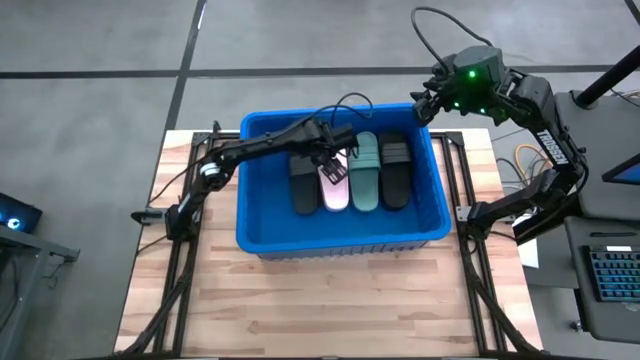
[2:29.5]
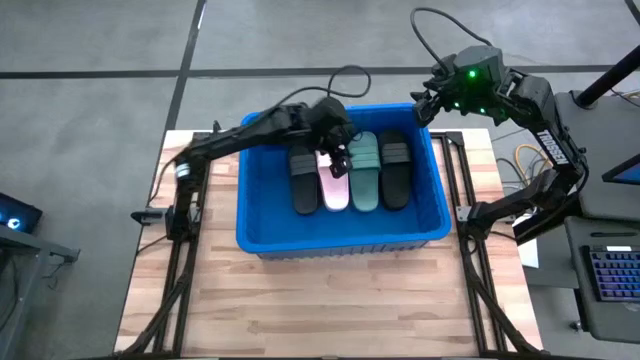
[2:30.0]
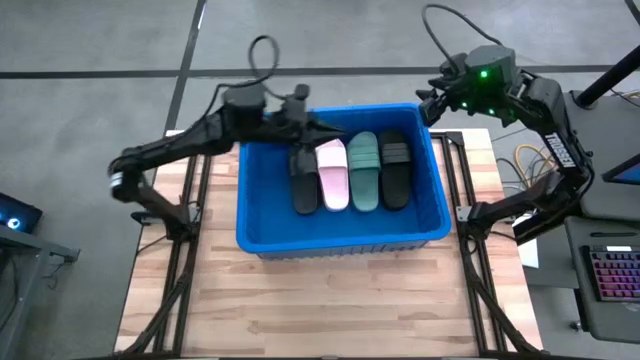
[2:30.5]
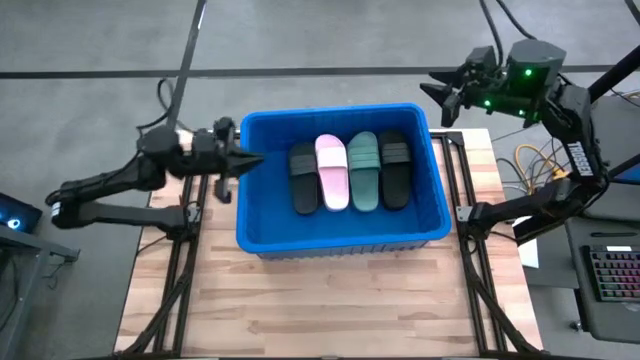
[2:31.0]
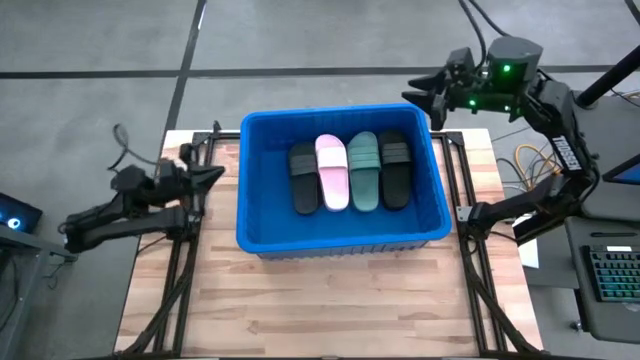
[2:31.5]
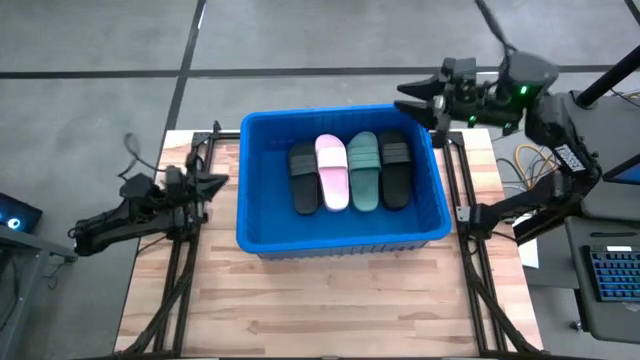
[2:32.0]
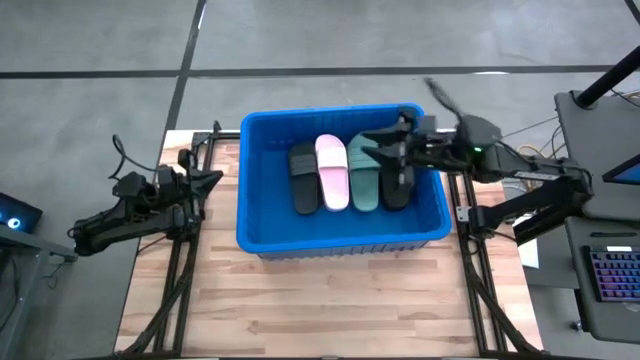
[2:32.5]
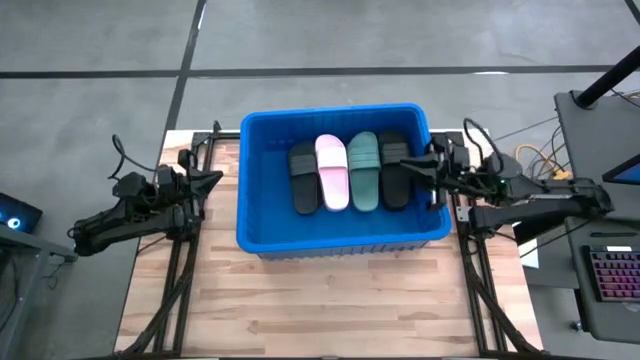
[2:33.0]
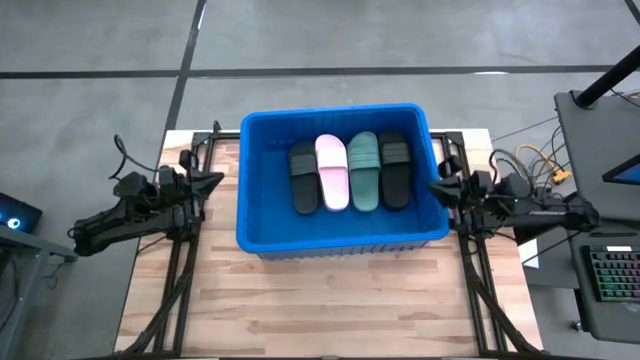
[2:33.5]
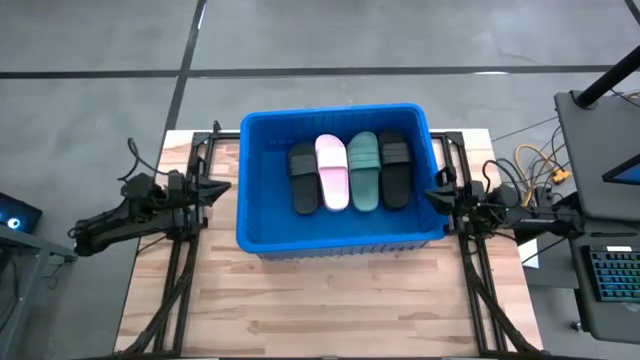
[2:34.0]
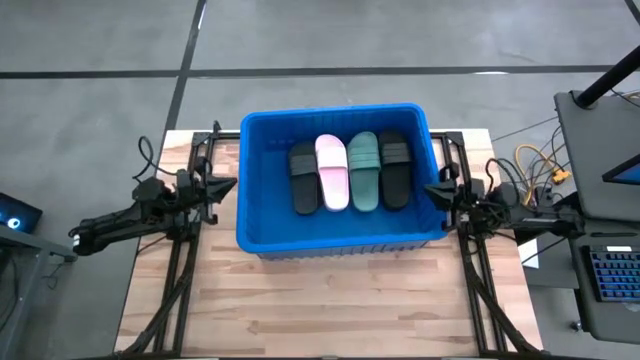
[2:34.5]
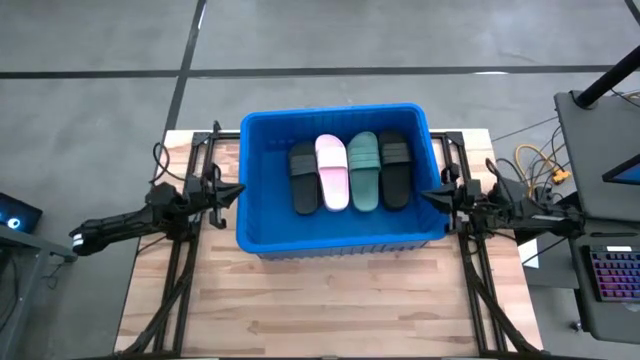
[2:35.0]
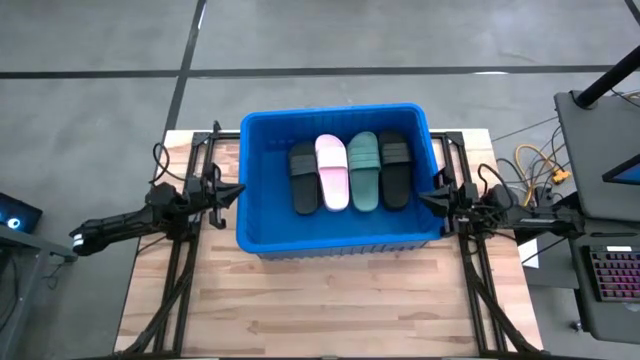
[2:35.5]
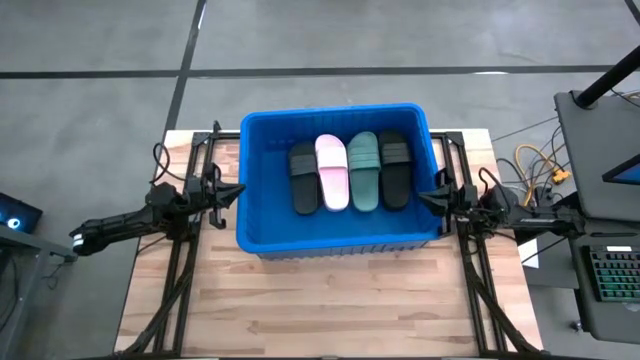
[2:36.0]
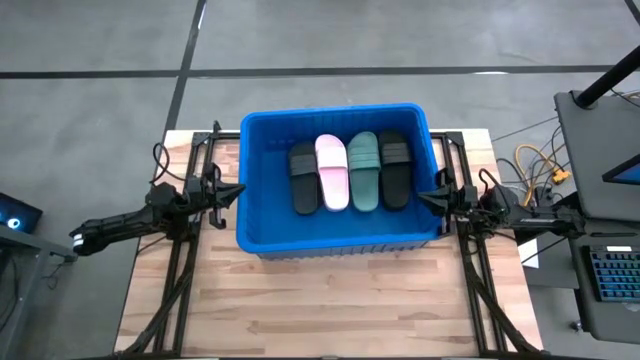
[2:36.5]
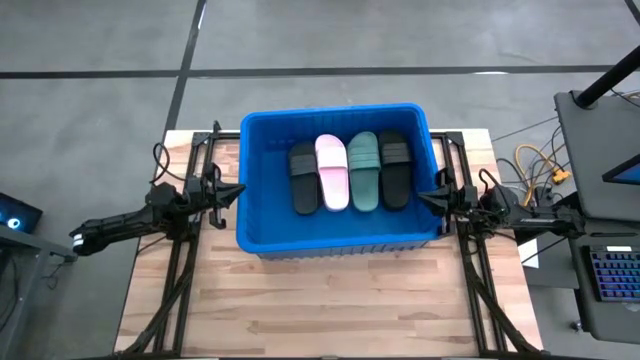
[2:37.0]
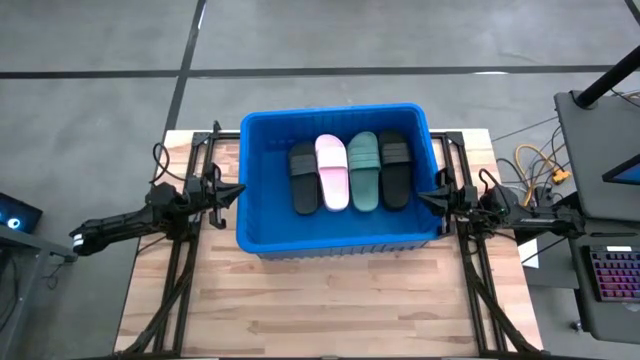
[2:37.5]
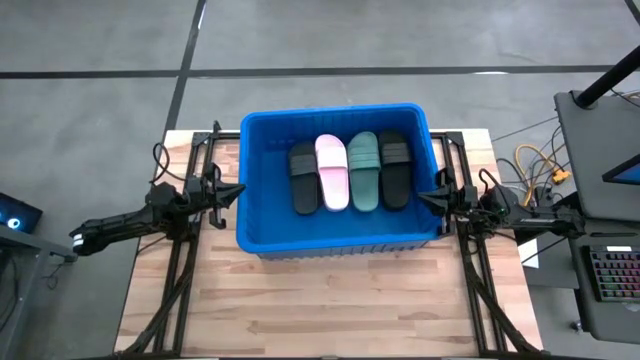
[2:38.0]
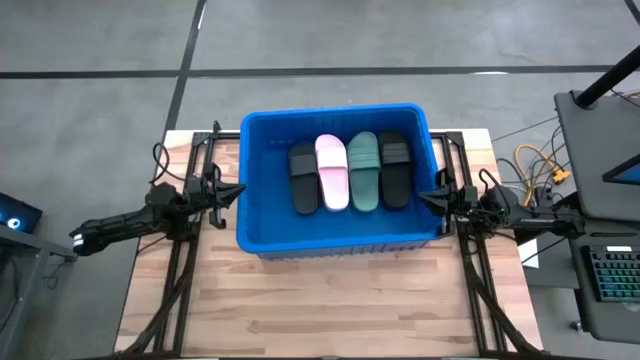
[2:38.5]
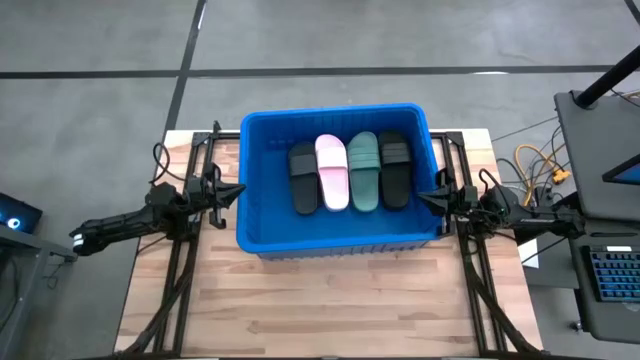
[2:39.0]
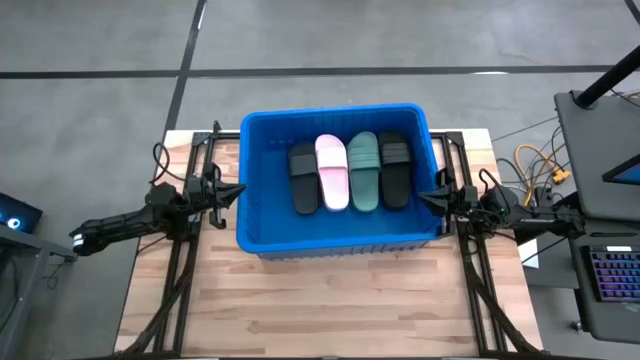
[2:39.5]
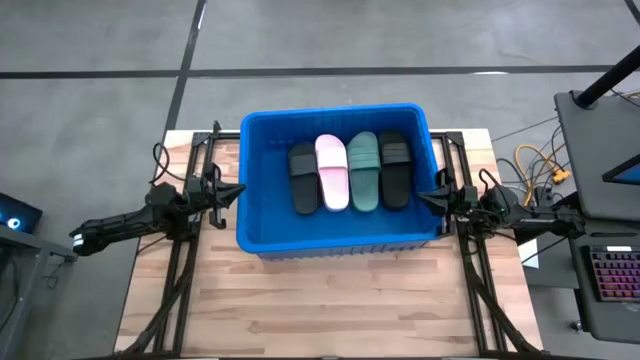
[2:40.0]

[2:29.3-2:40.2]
Task: Pick and place slides into bin
Return to Home Position

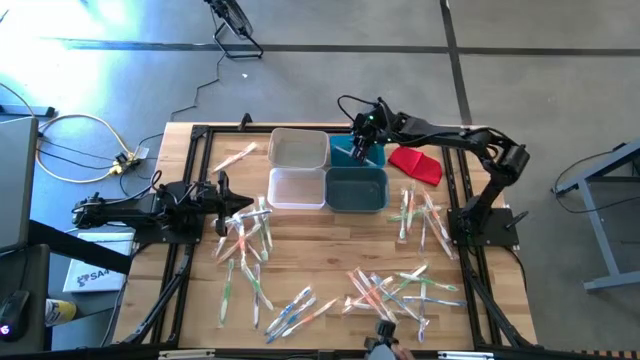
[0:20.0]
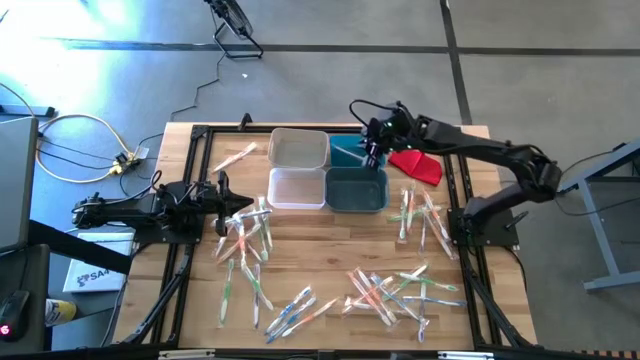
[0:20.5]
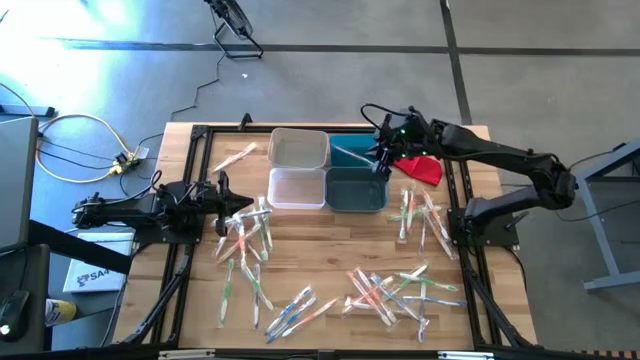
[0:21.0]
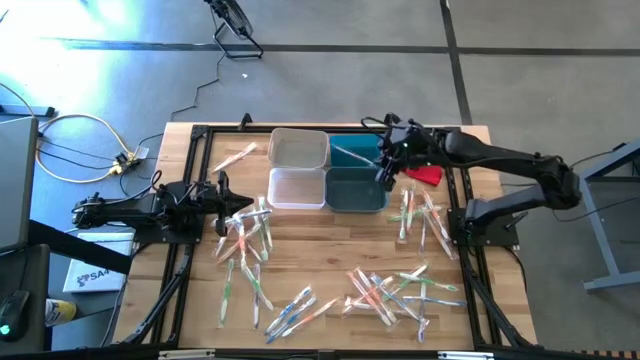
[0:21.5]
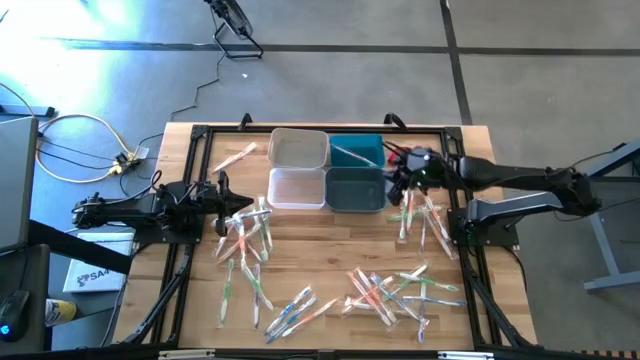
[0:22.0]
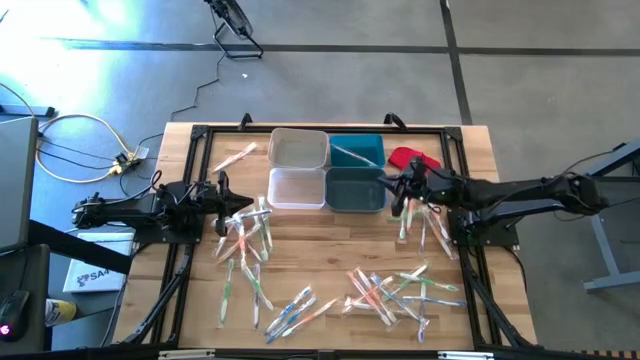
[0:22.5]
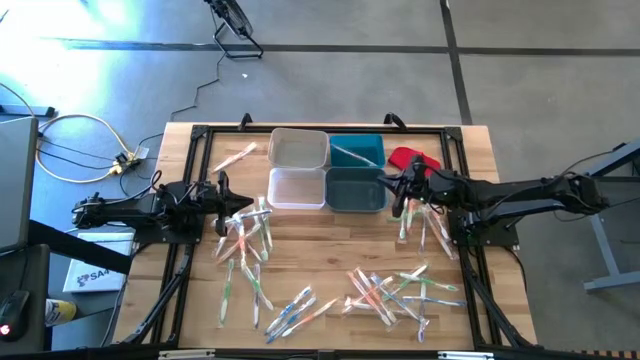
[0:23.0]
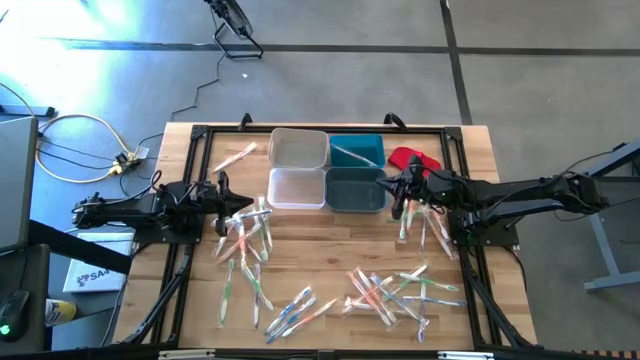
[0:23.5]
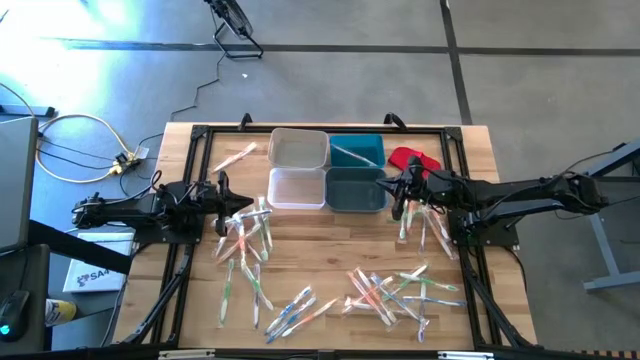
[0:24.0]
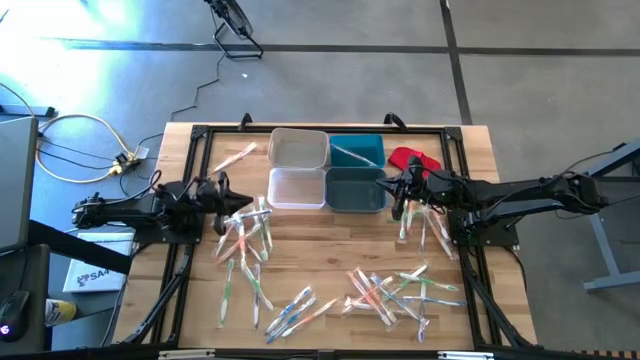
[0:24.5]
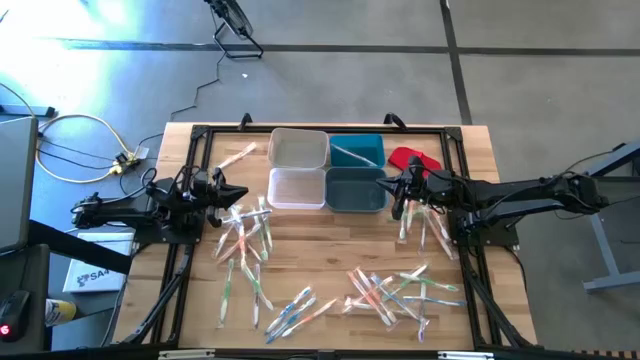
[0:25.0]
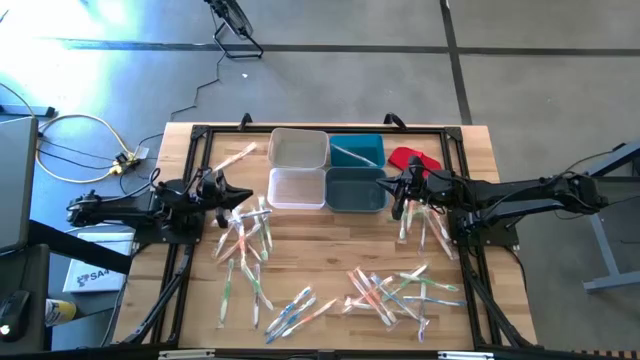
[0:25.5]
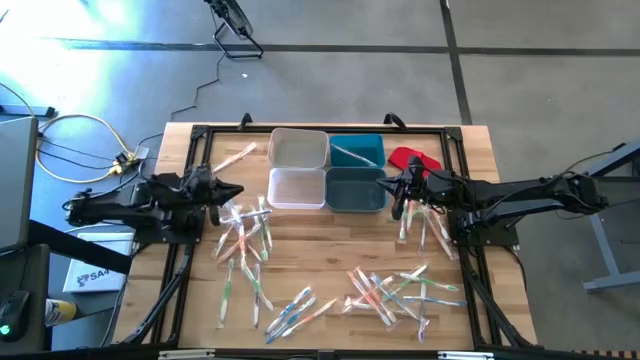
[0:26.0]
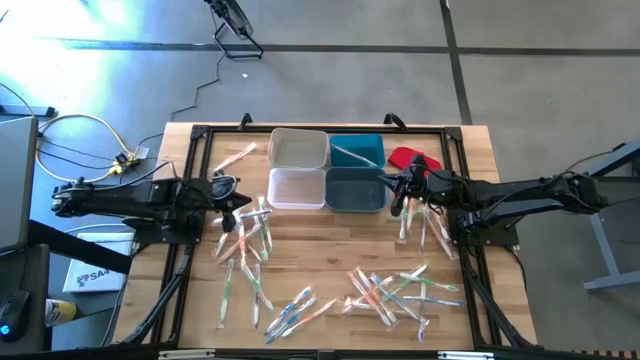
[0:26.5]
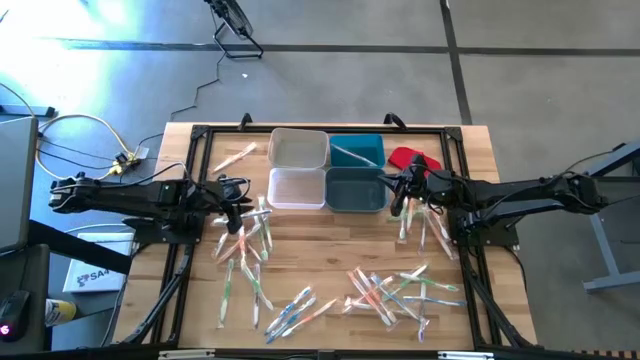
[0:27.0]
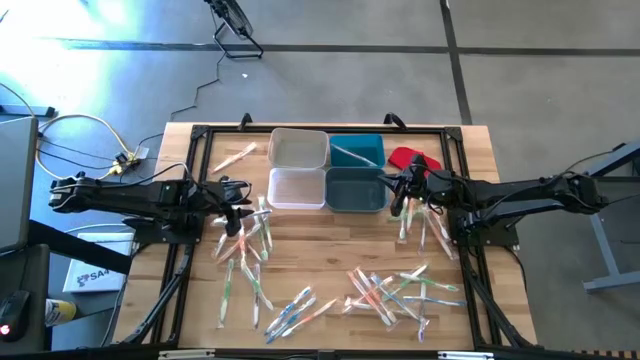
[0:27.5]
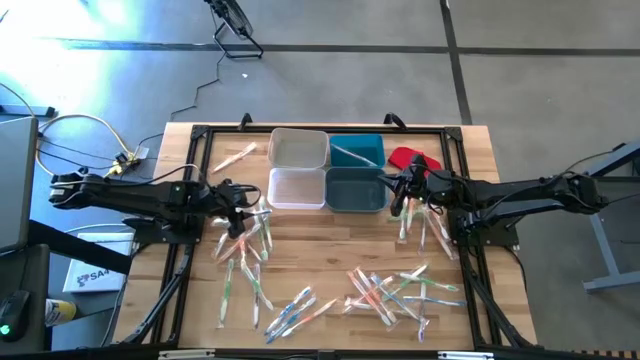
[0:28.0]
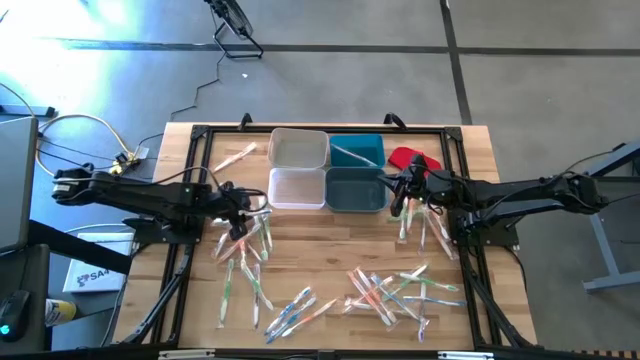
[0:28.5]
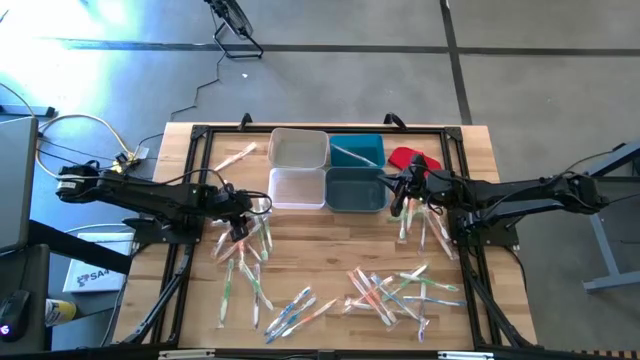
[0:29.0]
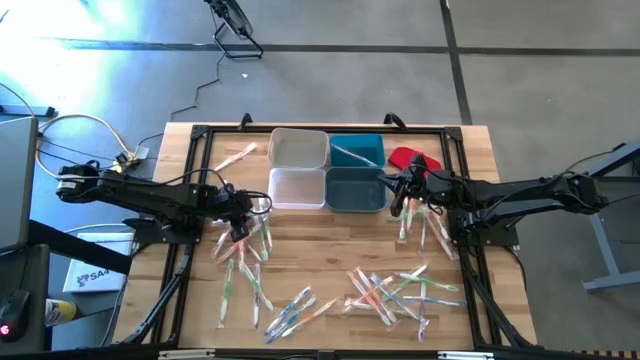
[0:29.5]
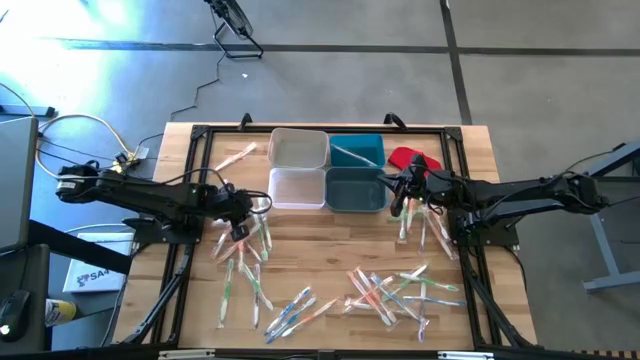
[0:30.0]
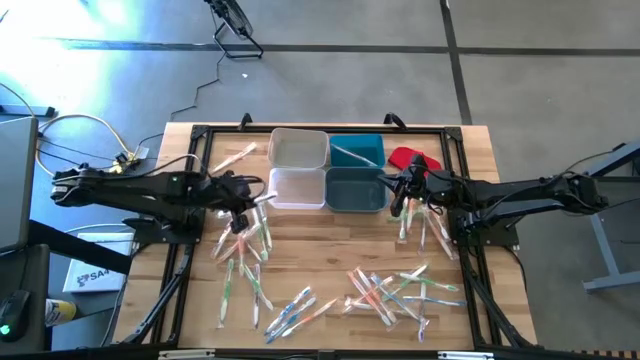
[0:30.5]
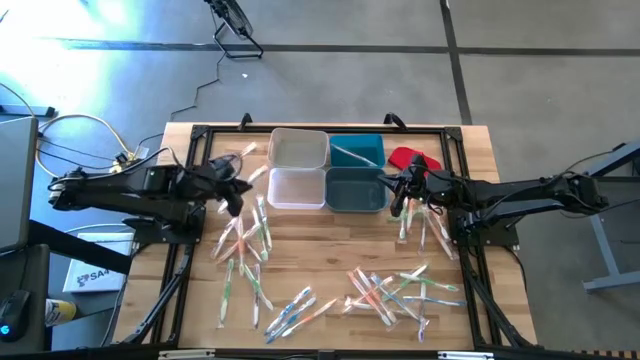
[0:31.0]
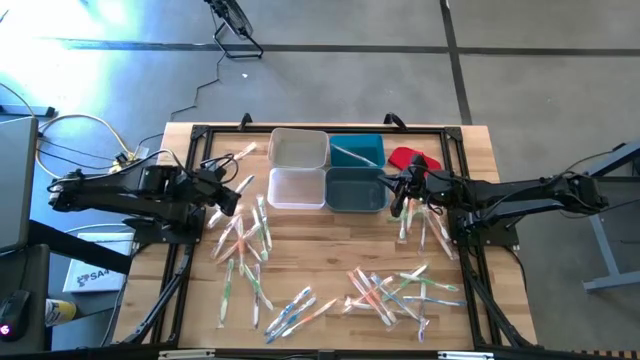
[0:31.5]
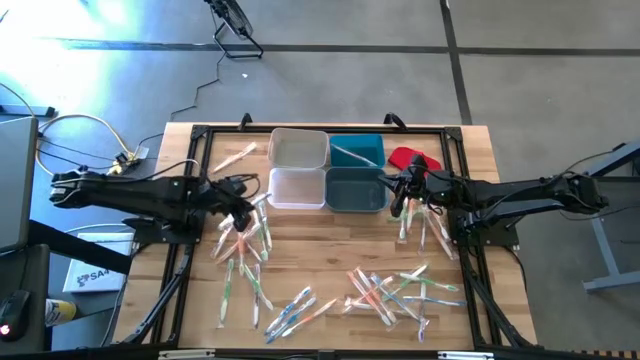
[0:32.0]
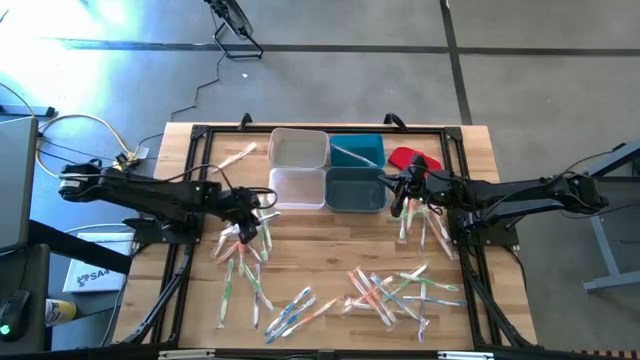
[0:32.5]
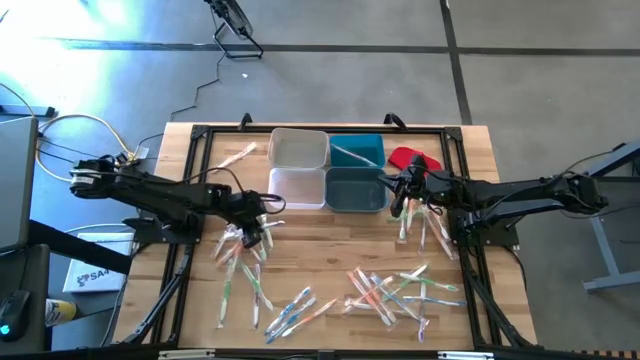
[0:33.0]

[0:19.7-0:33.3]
Task: Pick & Place Toothbrushes
Put the blue toothbrush into the white bin
